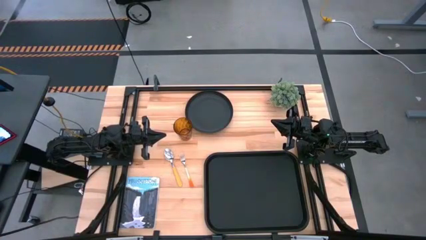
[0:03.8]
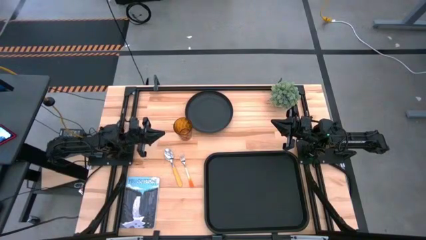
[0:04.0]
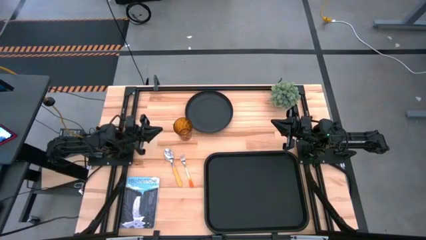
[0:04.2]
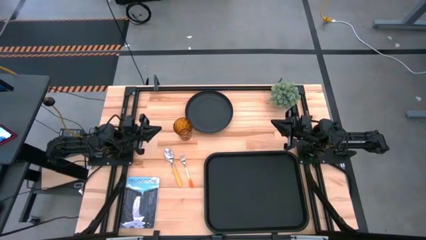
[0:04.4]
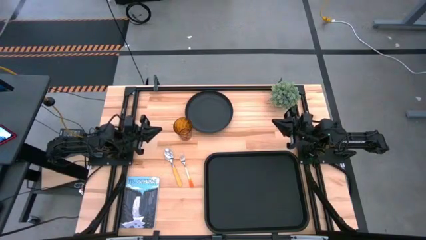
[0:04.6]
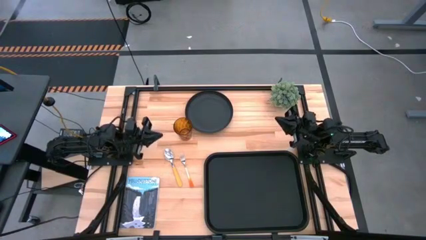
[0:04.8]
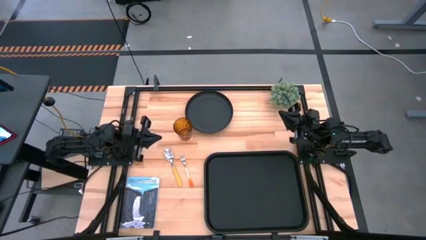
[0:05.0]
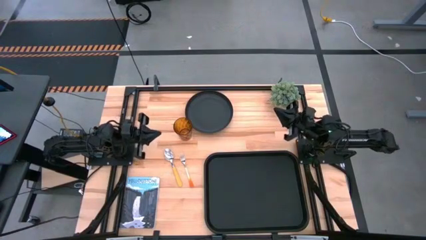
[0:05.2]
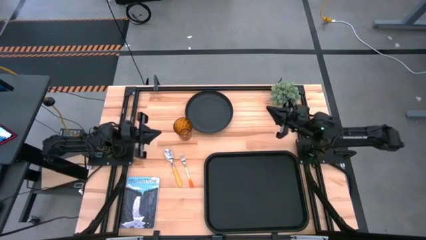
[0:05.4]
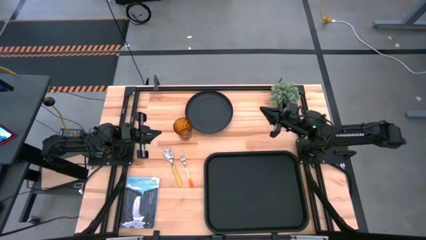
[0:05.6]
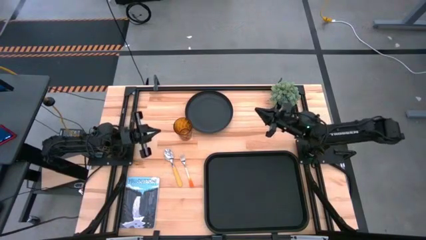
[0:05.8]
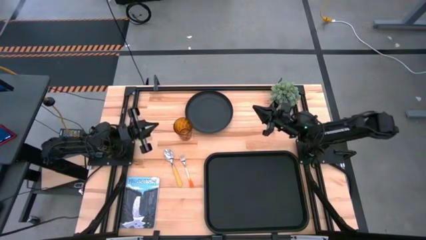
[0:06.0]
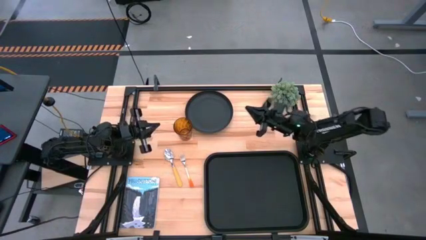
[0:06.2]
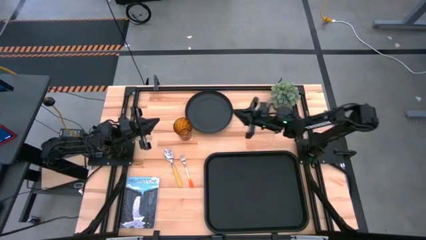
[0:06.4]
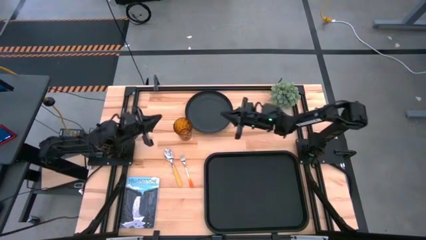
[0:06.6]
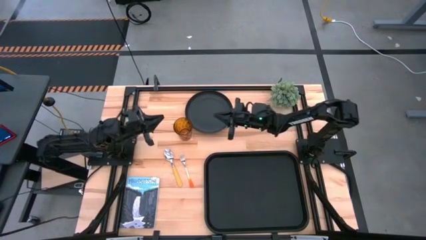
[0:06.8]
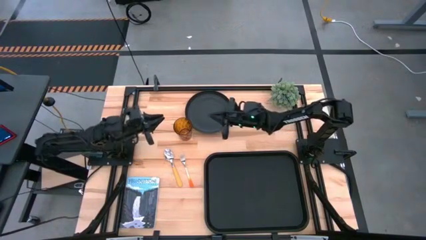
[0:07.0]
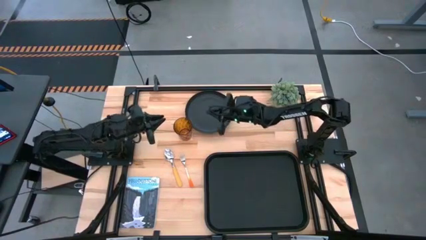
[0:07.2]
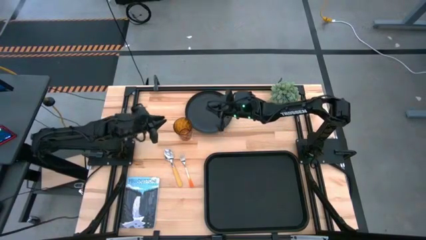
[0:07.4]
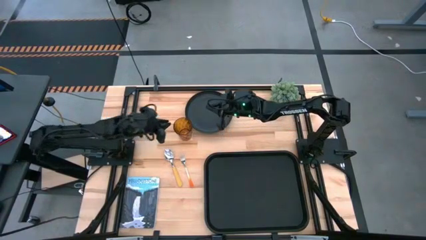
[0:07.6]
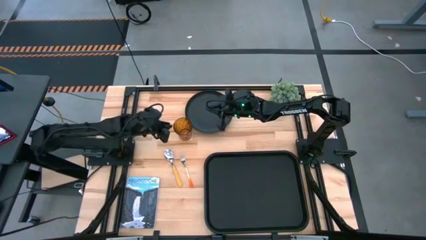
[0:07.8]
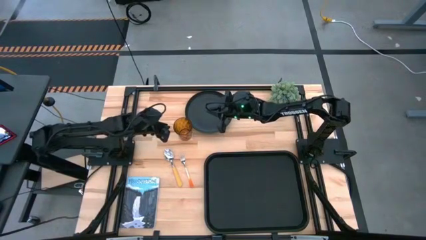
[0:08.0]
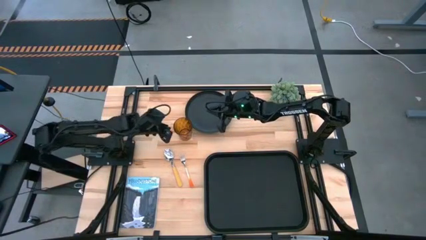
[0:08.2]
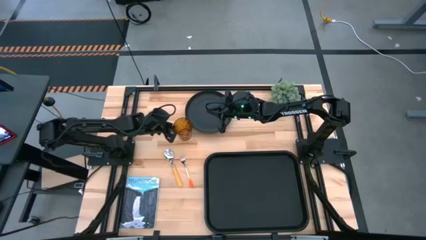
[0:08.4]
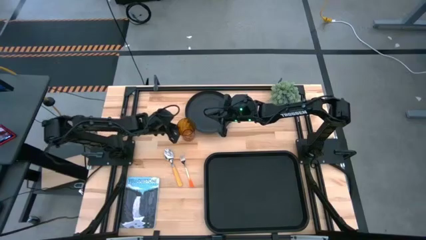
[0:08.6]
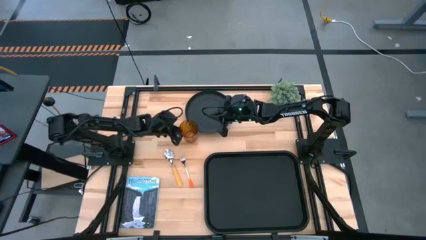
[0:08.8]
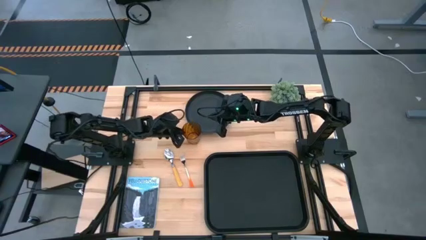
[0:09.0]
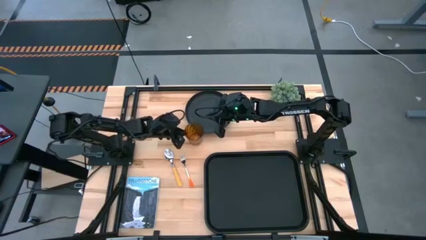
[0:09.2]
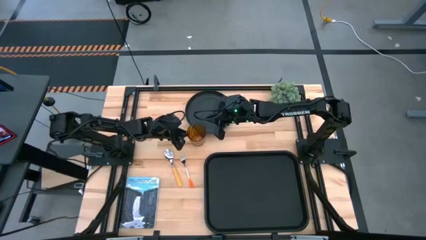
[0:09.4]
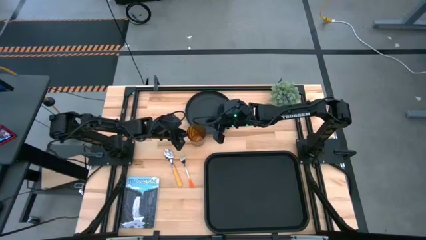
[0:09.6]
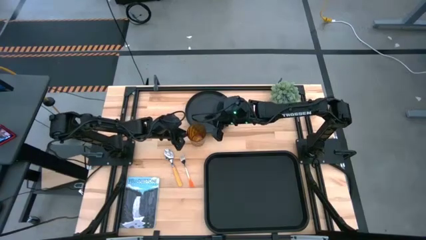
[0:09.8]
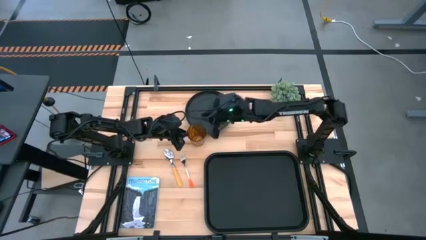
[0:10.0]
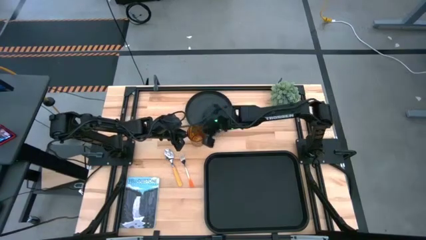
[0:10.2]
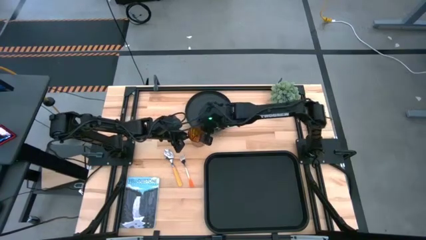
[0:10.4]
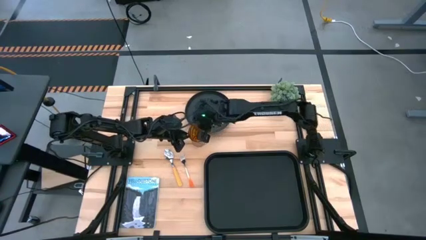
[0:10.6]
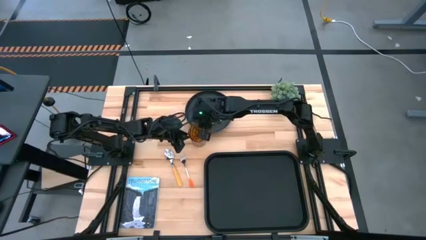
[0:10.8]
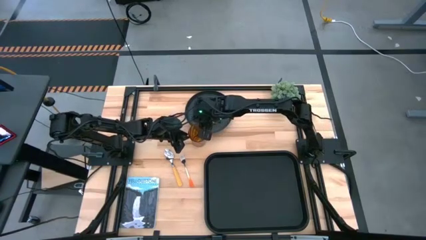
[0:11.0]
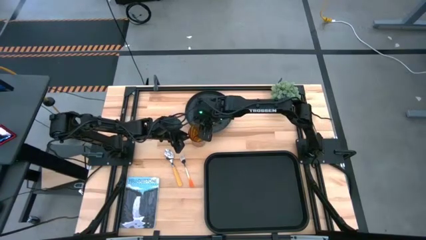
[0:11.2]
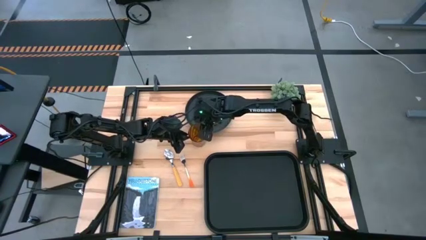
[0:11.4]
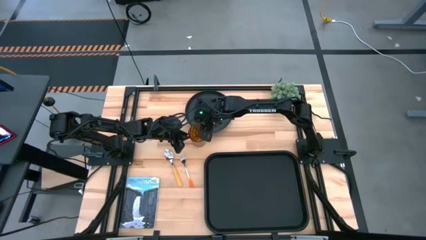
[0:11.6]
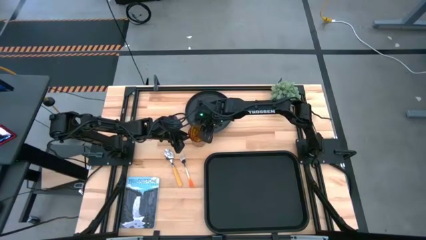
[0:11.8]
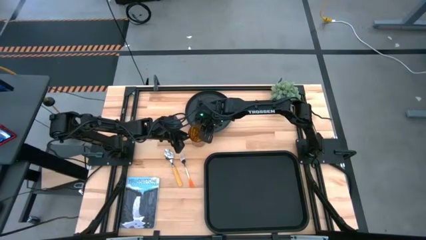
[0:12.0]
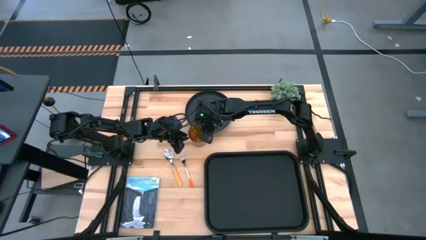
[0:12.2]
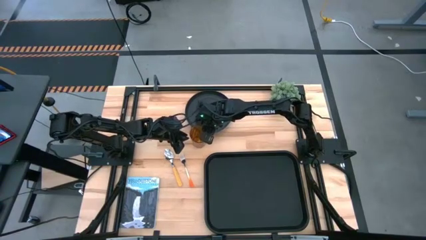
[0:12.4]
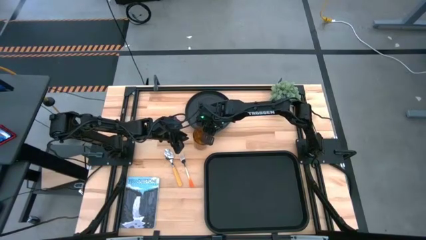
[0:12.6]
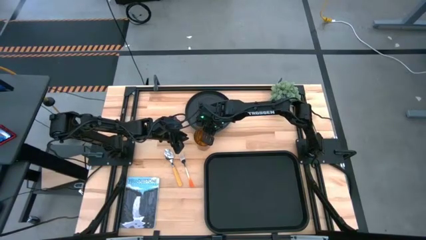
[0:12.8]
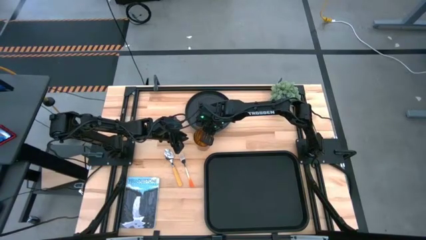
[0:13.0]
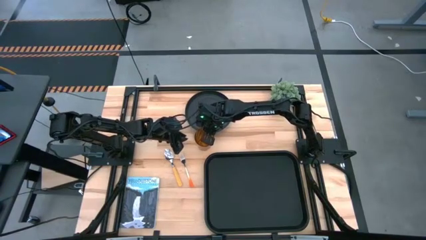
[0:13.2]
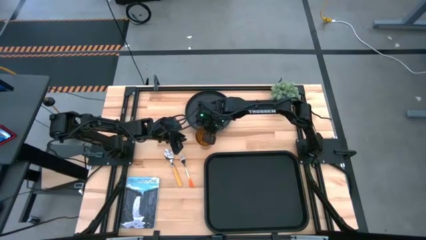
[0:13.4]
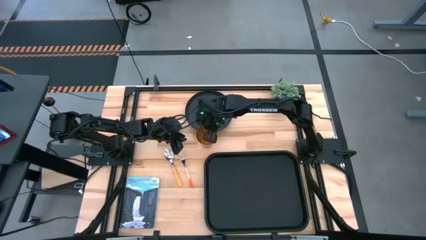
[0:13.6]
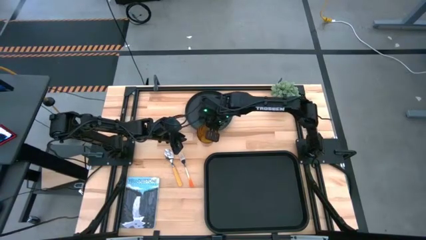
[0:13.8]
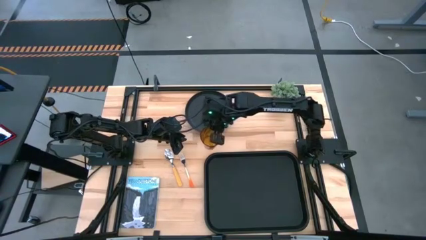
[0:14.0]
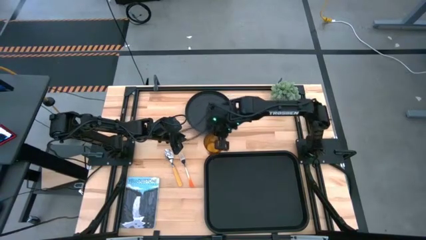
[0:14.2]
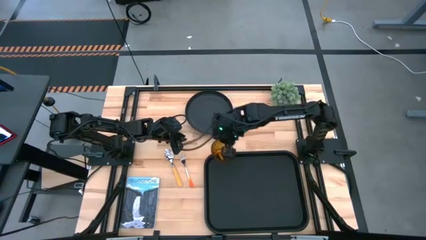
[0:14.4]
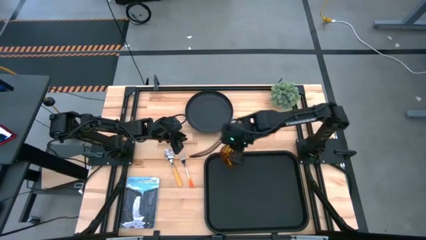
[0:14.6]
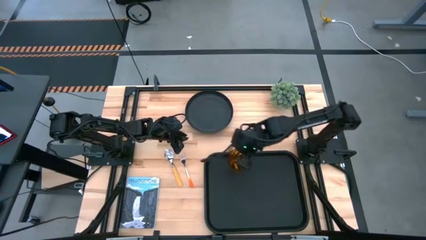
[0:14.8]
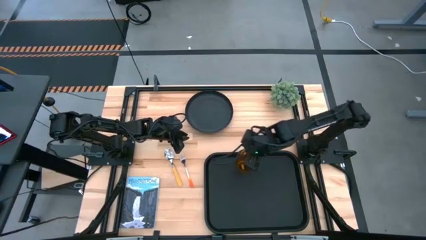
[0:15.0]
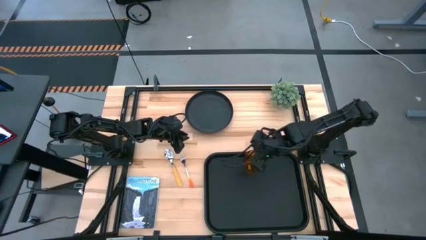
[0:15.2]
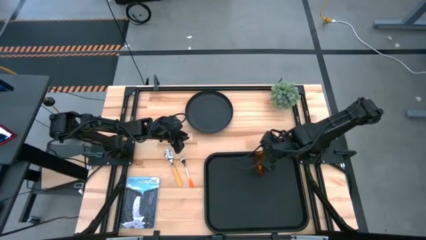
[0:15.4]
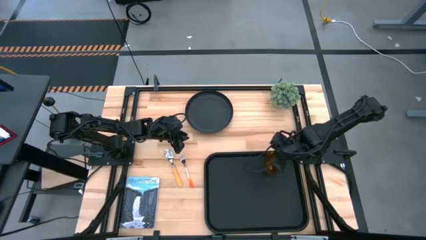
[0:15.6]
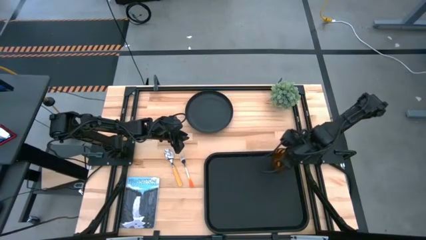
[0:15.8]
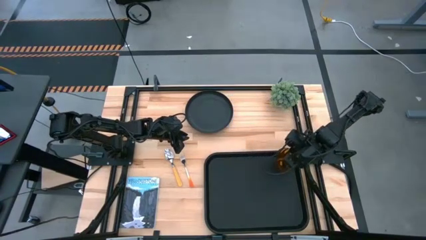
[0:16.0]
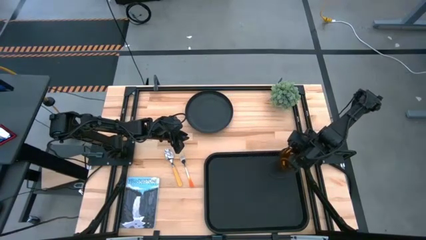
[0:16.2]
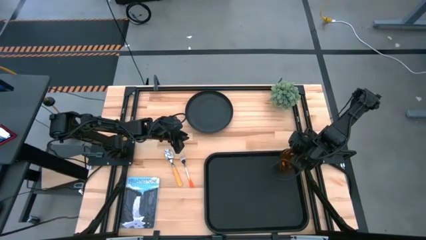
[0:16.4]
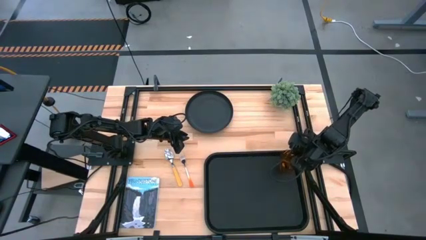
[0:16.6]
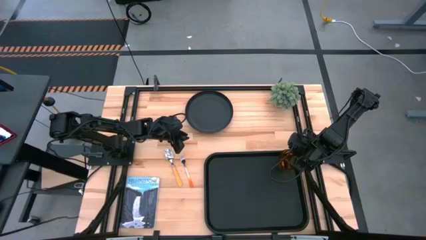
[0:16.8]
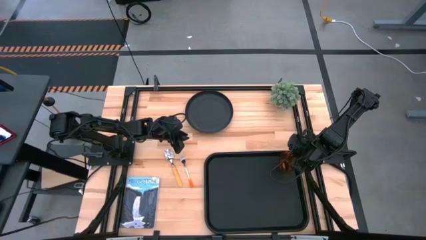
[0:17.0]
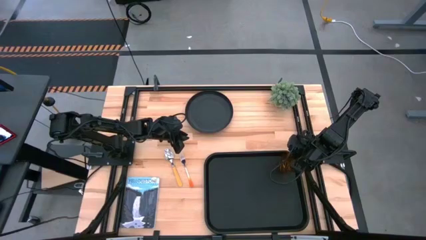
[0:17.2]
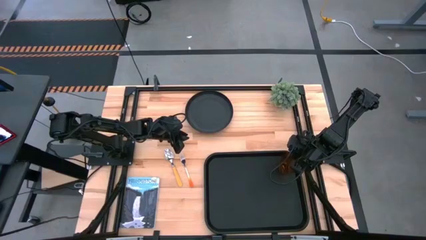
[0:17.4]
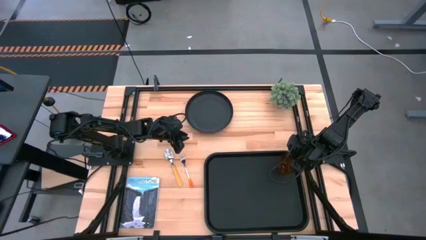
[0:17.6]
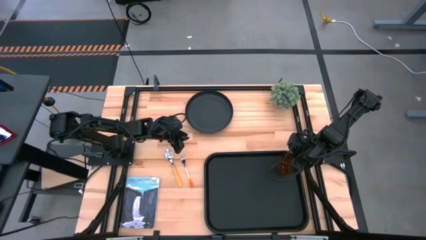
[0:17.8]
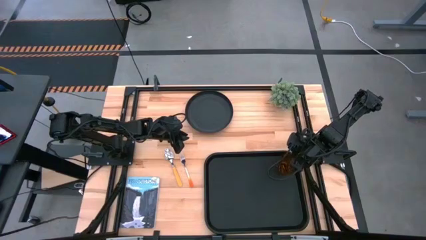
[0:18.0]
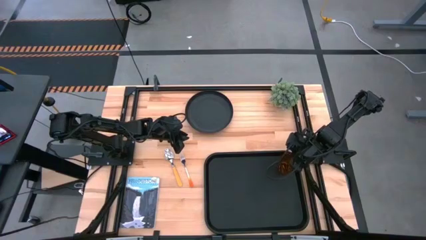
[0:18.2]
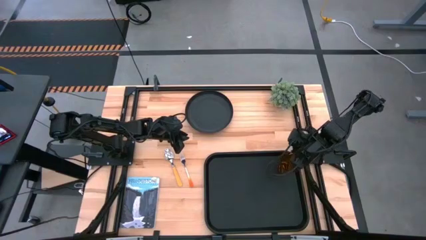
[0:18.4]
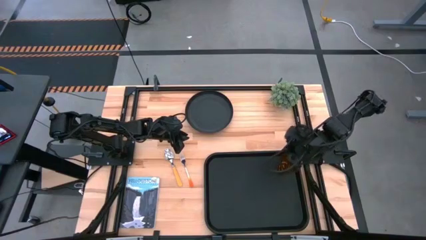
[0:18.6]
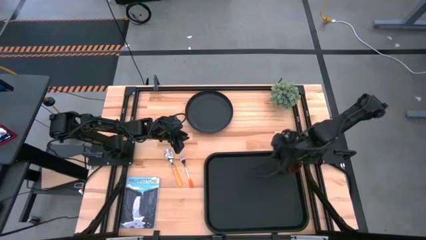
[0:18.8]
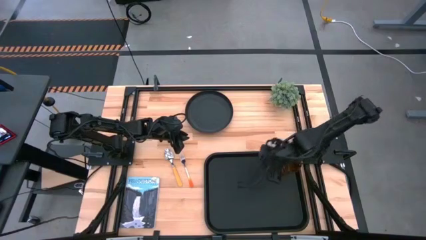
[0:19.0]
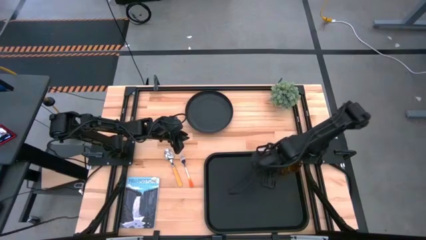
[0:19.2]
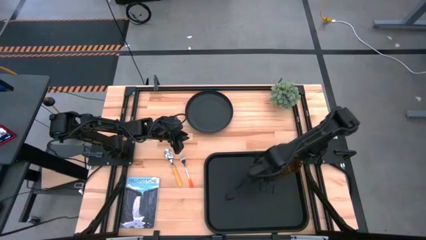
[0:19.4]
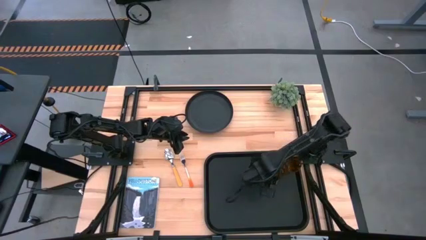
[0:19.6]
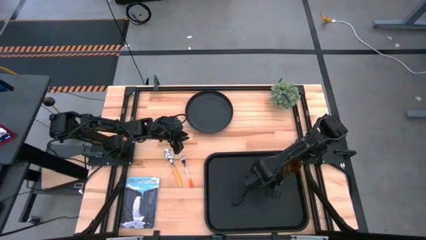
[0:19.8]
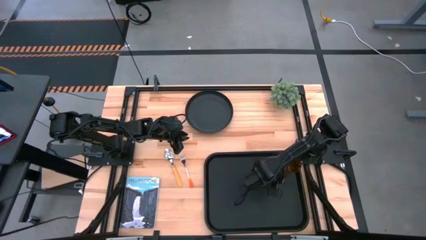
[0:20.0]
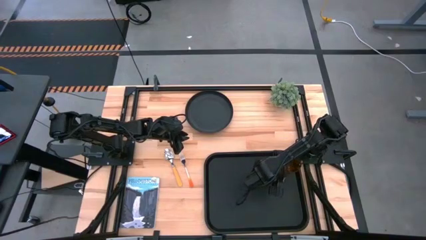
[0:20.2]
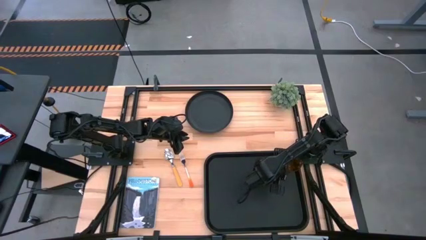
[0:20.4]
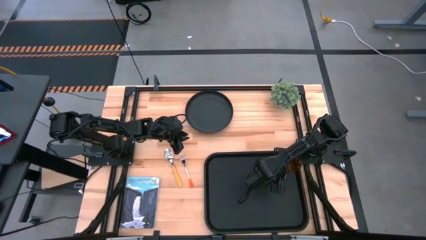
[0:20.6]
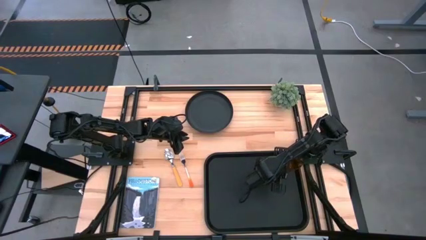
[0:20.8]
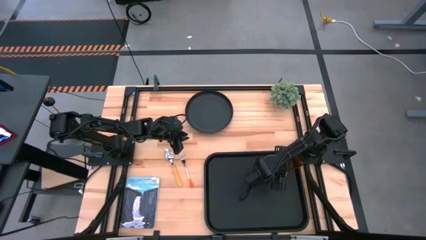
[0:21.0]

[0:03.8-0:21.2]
Task: Pick and place plate/cup/fork/spoon on tray
Put the brown cup on the black tray
